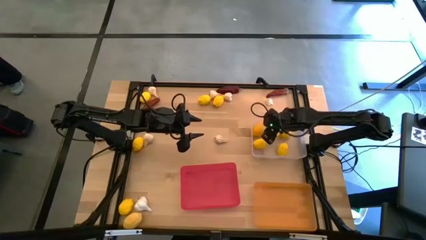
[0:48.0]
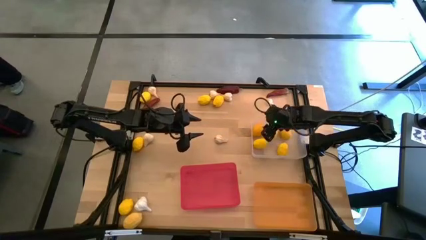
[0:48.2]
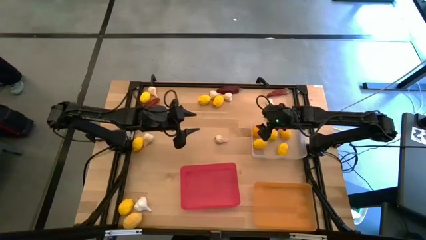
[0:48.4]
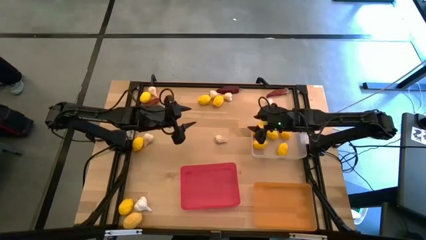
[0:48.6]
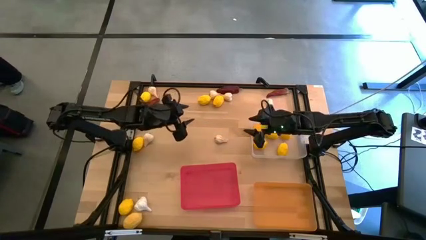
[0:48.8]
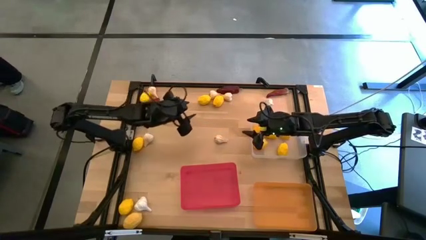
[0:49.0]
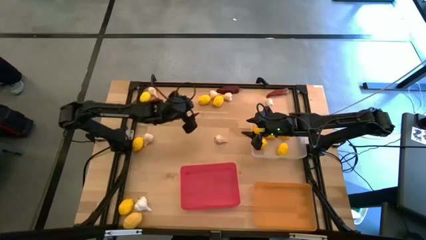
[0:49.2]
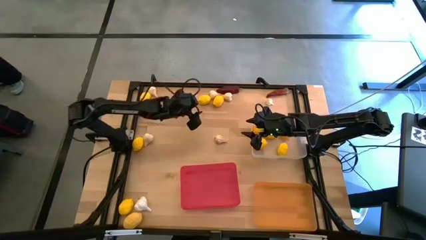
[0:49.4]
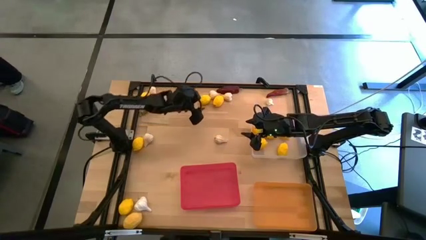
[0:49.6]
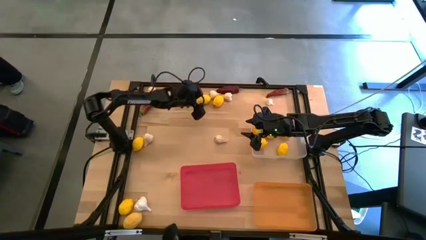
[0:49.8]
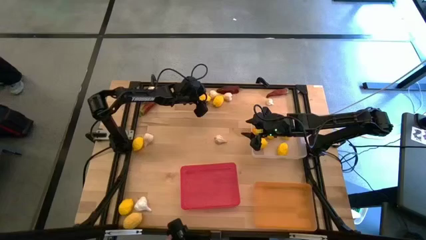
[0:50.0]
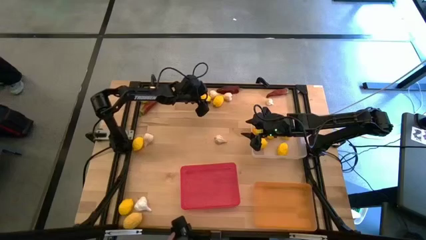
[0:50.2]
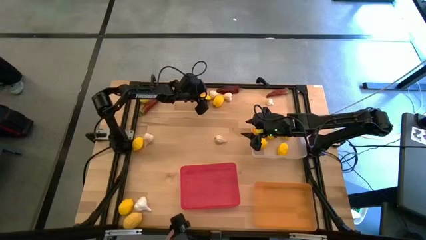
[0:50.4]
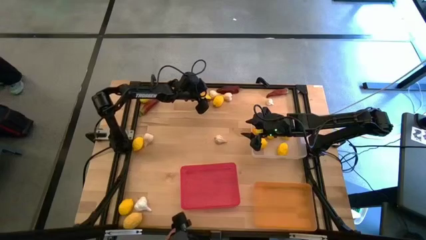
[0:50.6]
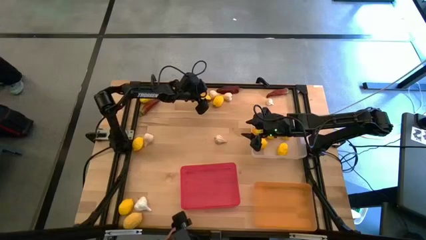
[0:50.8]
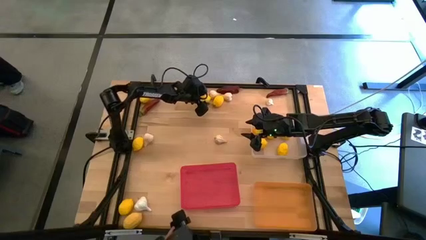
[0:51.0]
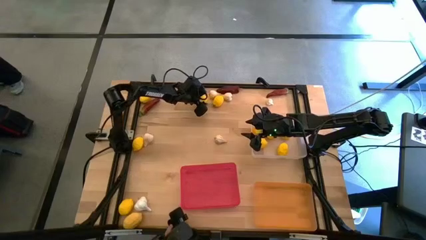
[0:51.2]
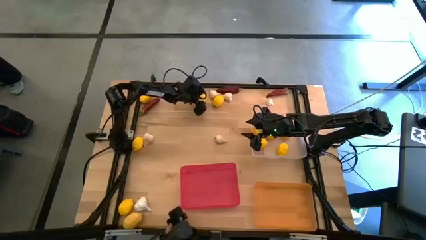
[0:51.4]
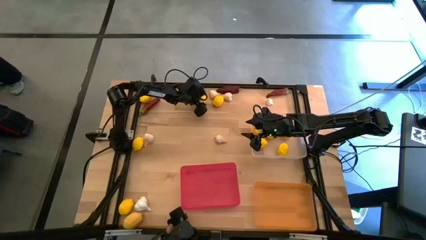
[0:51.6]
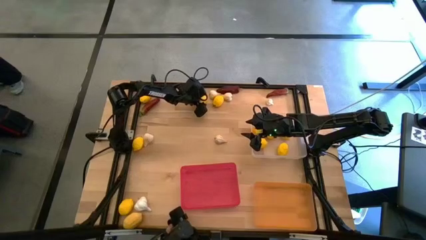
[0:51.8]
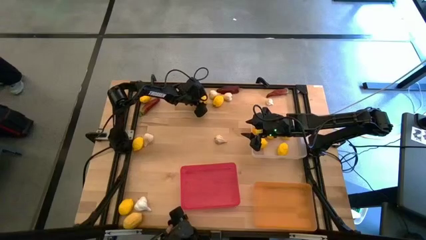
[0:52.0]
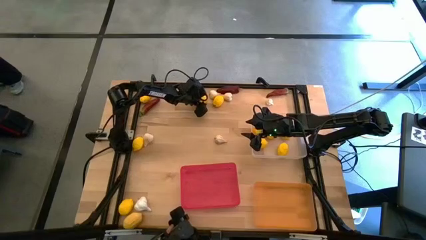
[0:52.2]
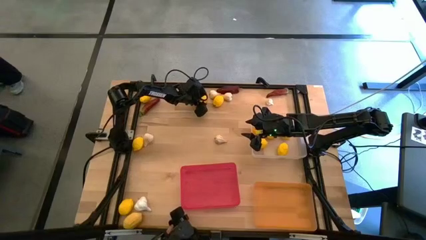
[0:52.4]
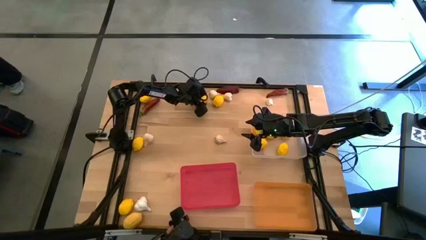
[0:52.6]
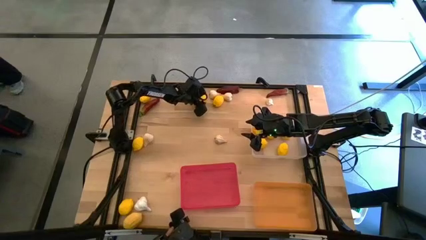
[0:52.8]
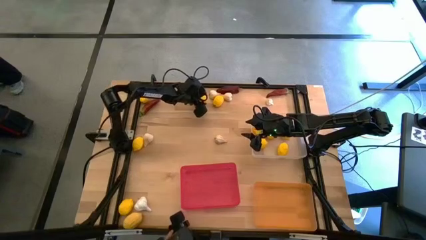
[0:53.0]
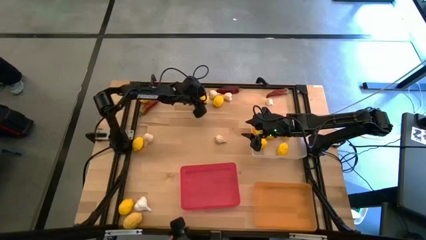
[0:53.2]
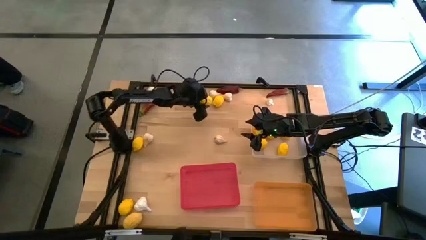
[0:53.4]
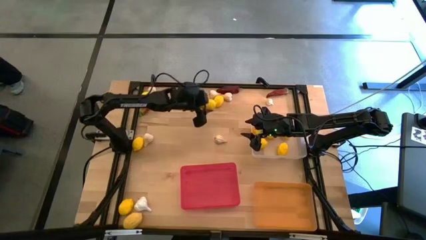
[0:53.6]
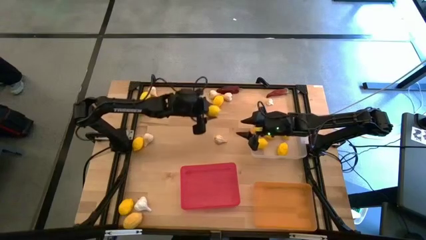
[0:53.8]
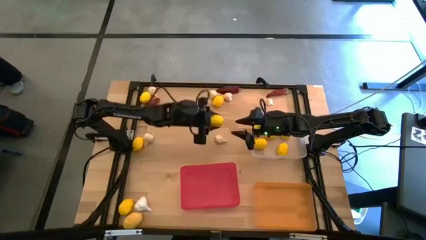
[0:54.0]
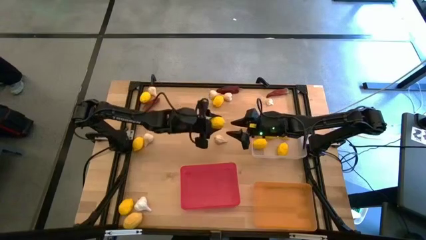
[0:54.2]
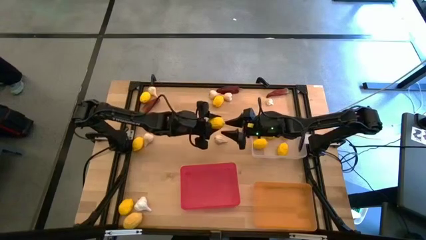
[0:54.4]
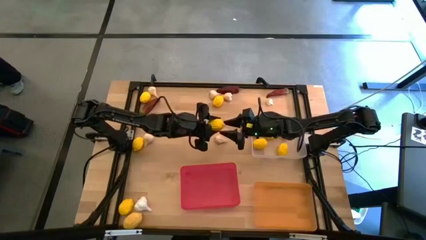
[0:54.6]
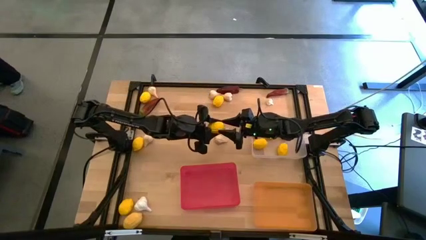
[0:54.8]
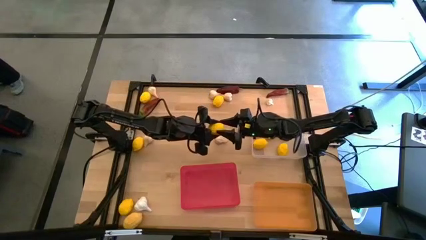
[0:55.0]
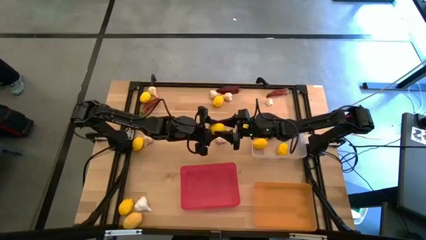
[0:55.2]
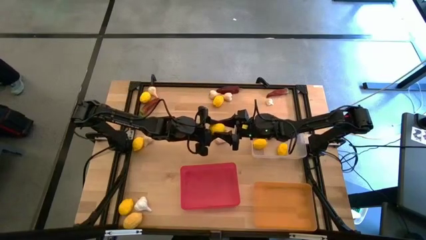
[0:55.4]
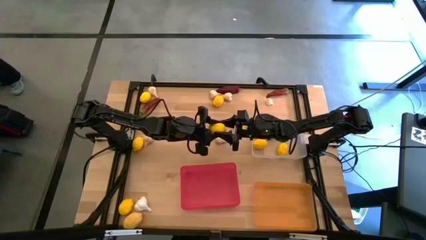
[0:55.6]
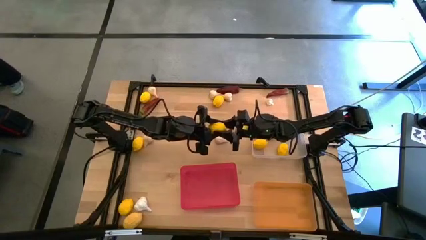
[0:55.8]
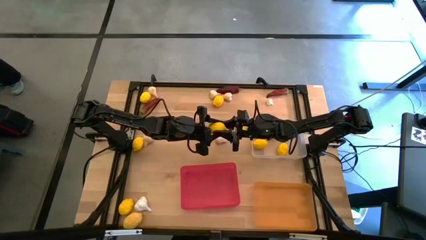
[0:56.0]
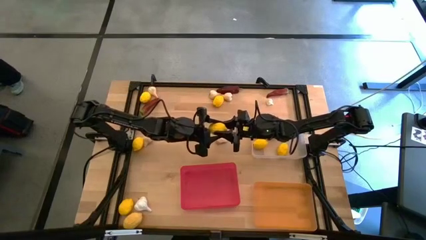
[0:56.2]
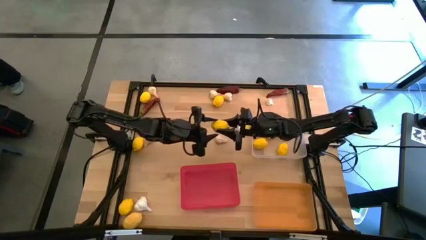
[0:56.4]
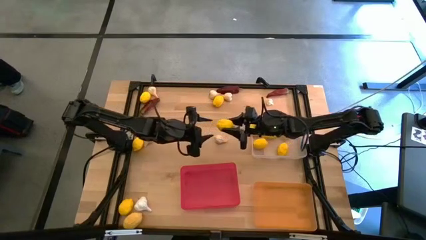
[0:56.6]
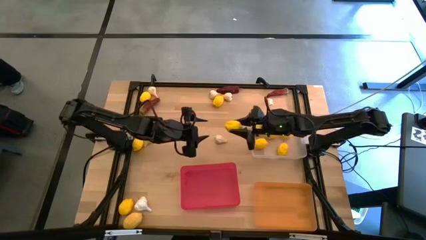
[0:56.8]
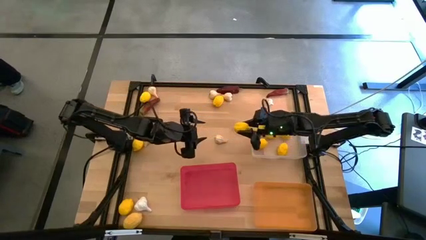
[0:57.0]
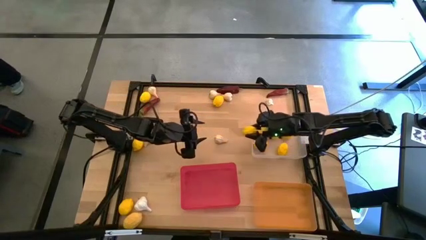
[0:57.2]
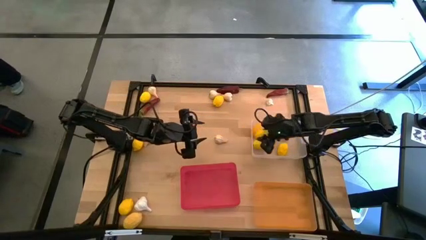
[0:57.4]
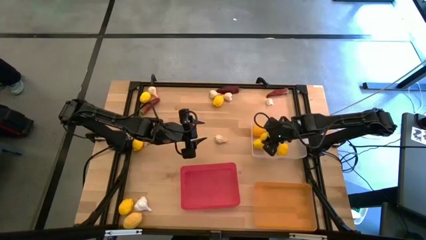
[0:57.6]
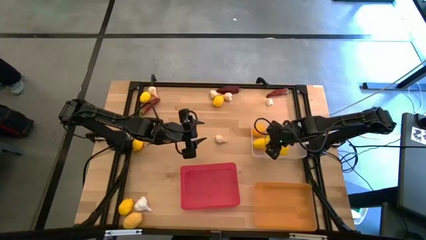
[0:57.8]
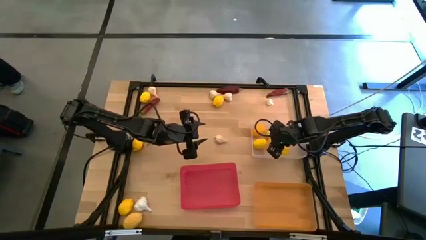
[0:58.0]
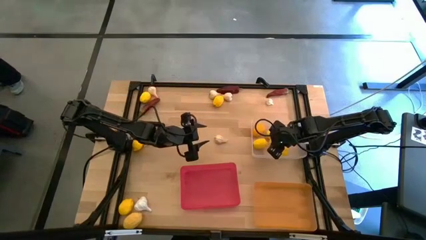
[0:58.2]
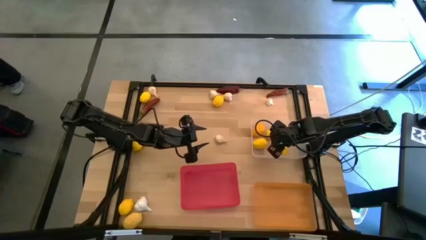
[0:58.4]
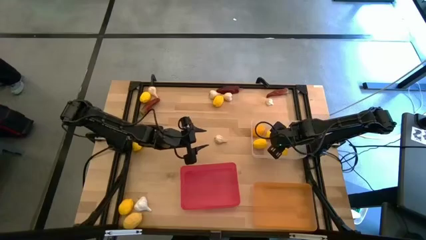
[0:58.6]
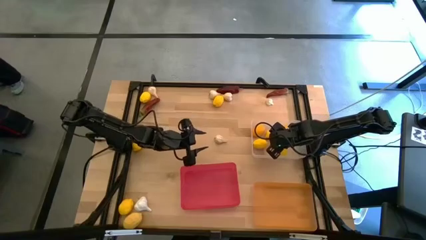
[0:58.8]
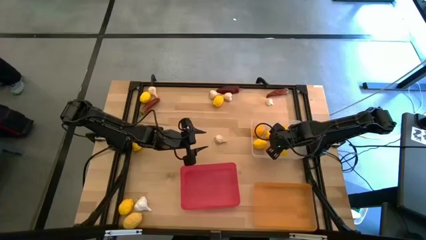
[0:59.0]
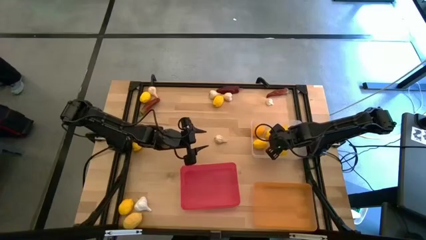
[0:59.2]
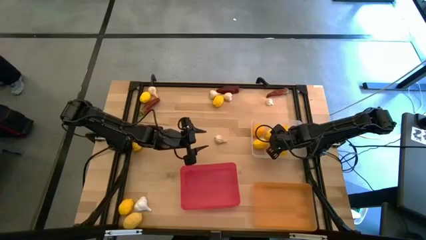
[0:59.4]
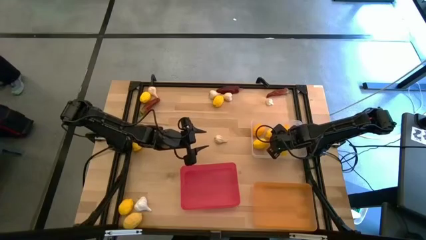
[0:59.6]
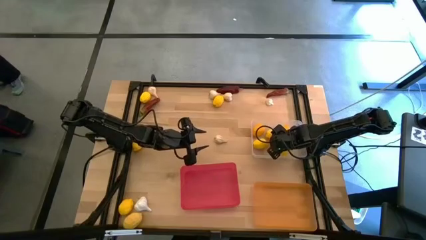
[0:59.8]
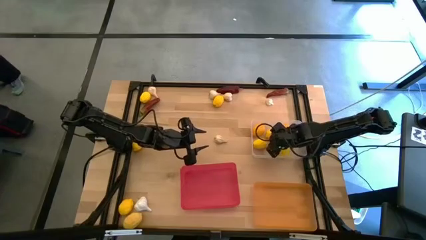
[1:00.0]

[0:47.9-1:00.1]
Task: Sort produce into baskets
Put the yellow lemon into the transparent bin

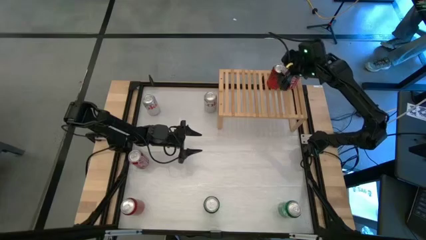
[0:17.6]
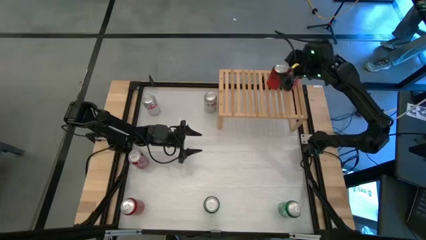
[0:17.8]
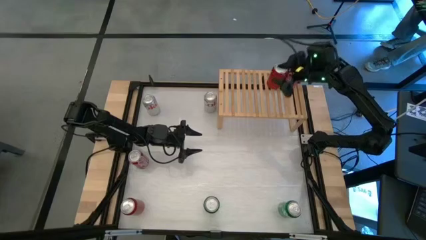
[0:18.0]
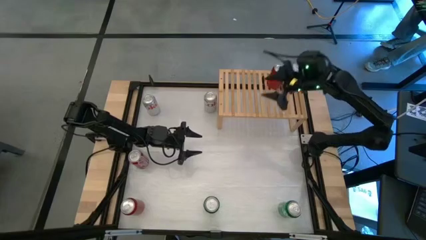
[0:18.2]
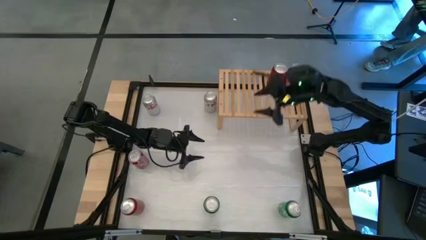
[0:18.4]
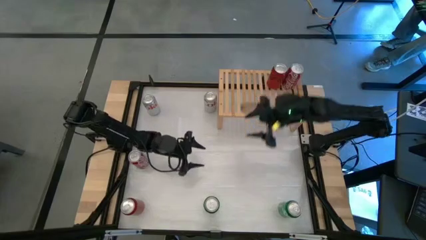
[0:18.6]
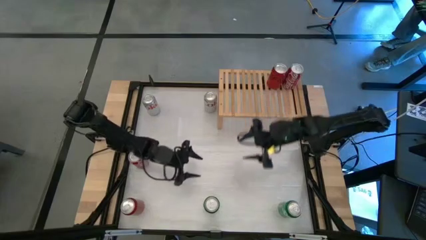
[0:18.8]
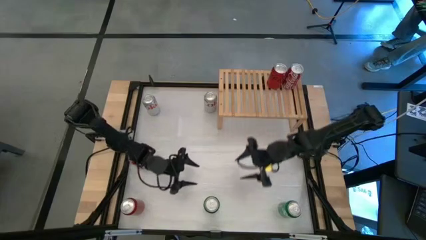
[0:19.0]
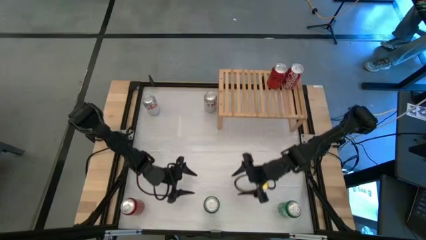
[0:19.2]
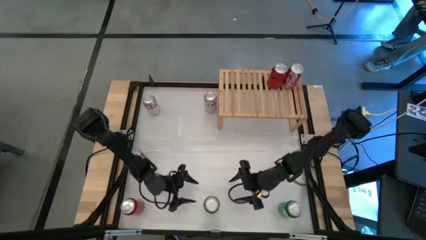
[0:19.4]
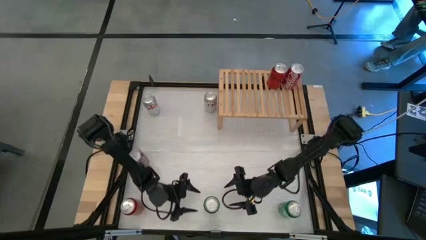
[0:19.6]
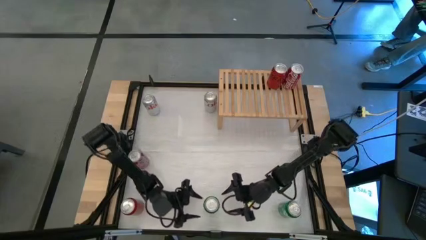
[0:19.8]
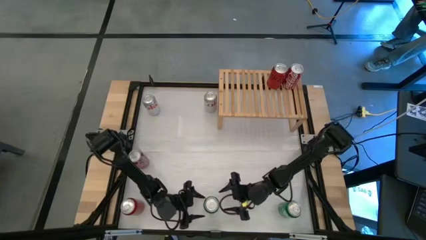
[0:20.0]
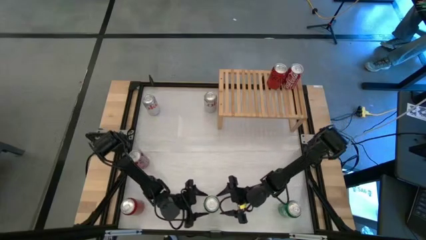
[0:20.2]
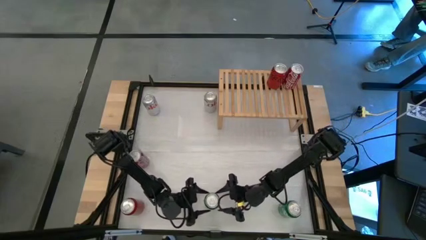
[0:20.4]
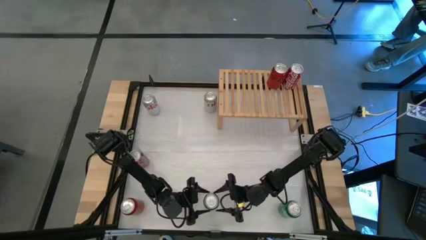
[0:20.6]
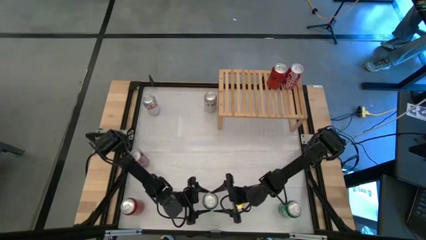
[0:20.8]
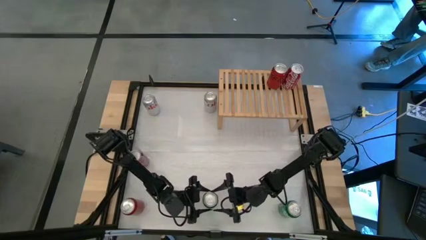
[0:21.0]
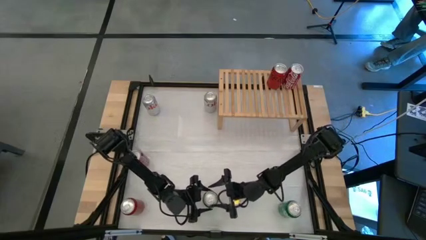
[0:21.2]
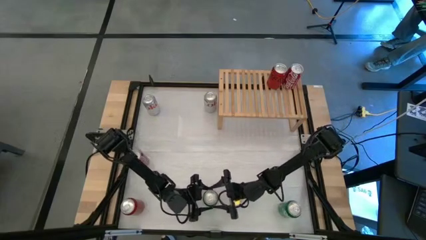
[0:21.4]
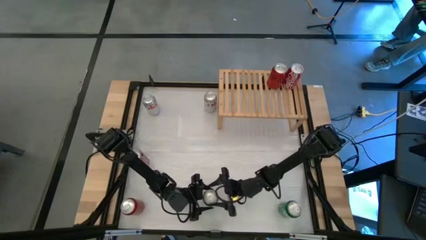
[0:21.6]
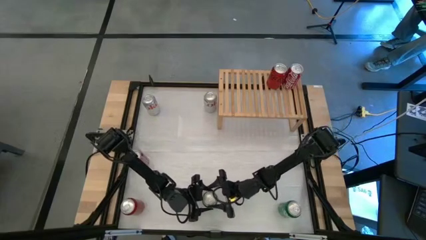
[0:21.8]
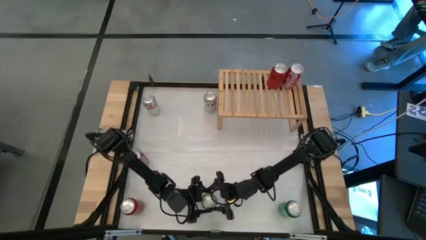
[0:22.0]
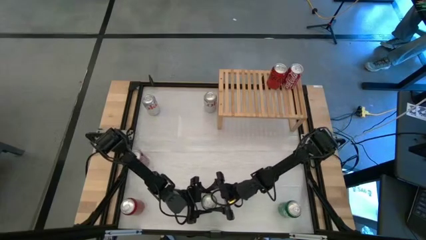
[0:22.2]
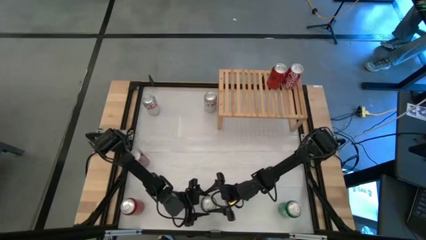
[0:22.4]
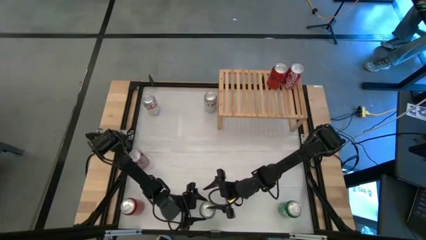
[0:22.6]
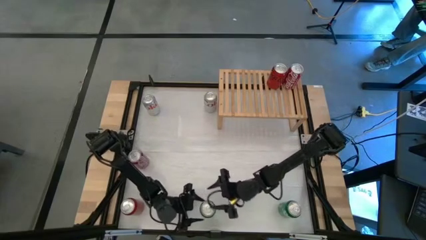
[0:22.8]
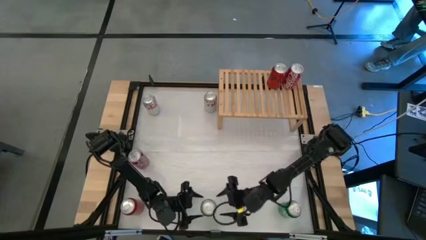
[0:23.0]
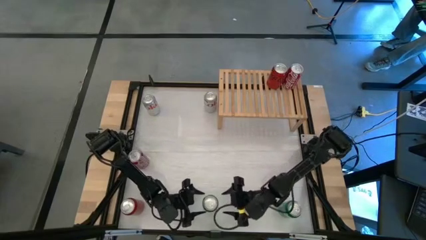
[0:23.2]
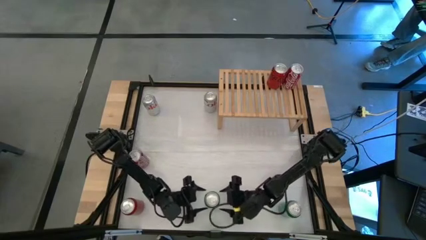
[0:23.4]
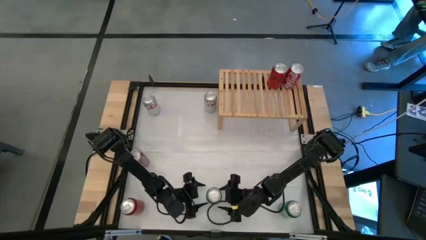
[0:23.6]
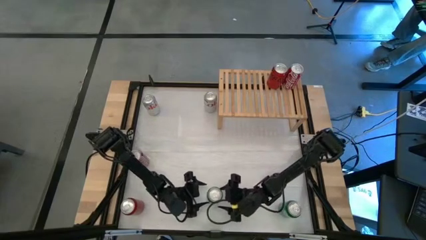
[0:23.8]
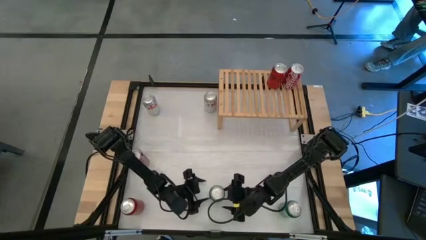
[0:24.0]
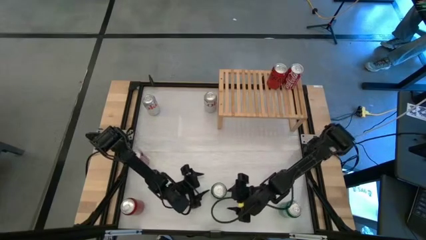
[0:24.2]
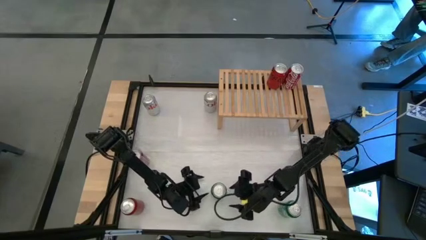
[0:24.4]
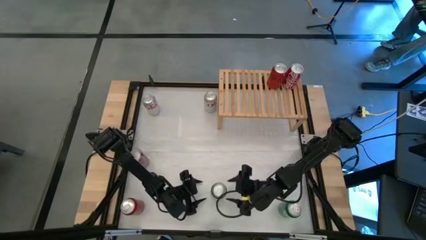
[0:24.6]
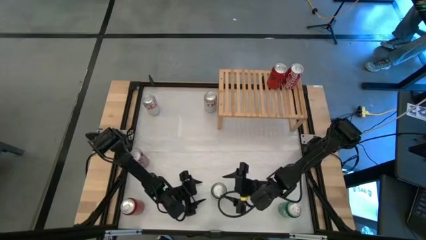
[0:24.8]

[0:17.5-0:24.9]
Task: Place canned beverage on shelf
Put the left green soda can on the shelf
